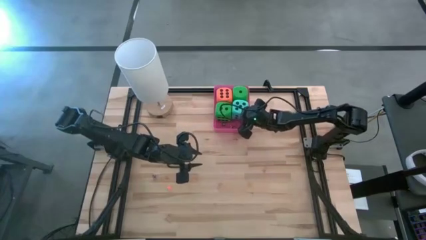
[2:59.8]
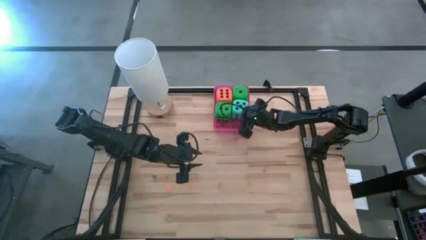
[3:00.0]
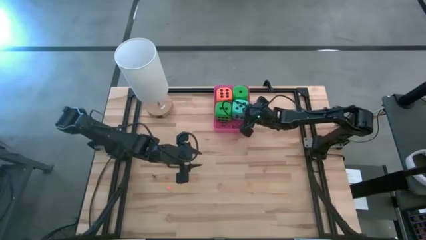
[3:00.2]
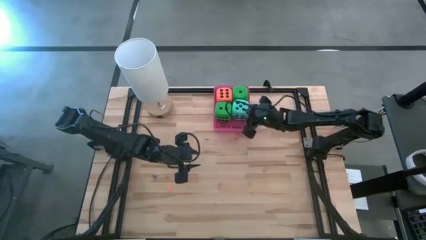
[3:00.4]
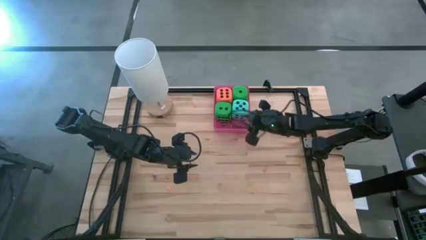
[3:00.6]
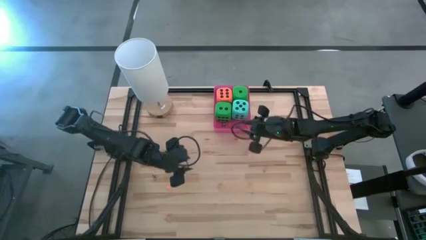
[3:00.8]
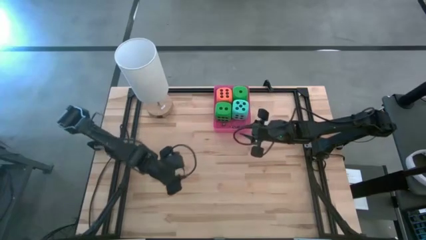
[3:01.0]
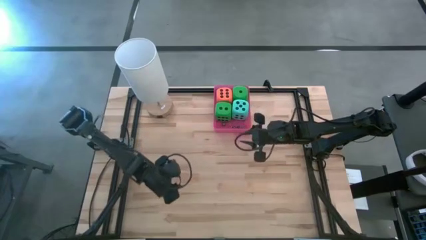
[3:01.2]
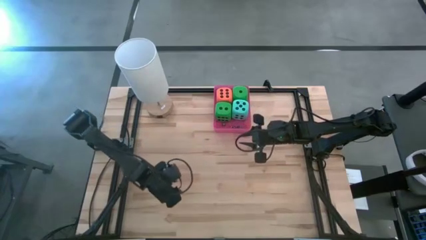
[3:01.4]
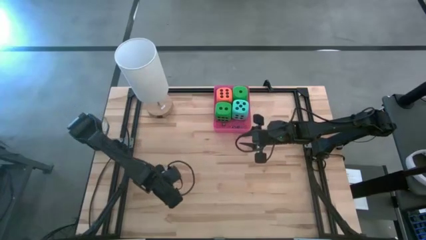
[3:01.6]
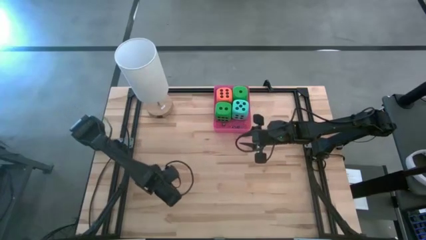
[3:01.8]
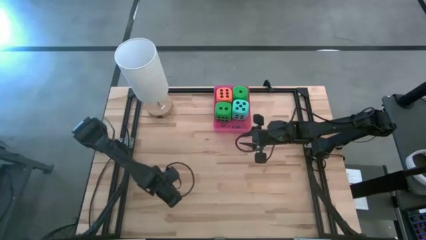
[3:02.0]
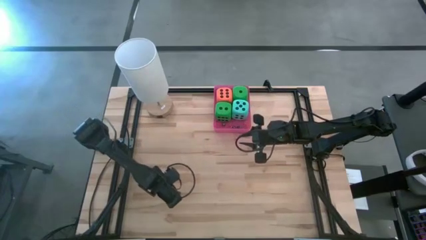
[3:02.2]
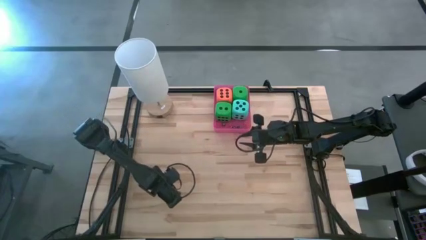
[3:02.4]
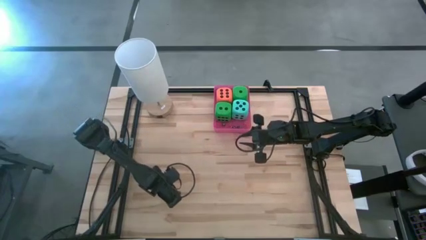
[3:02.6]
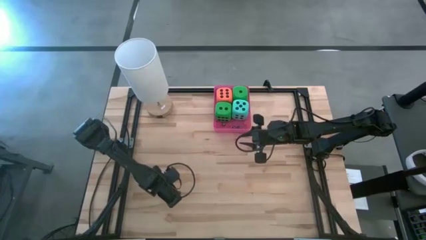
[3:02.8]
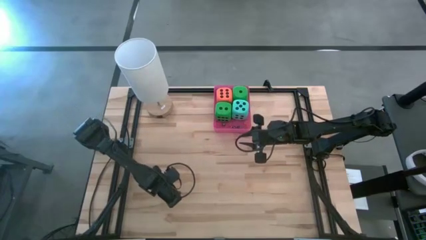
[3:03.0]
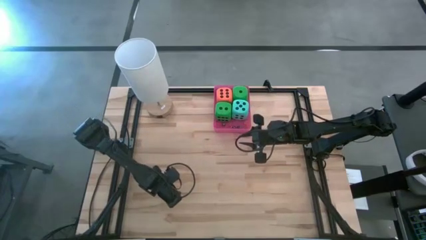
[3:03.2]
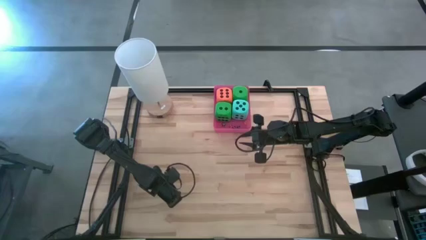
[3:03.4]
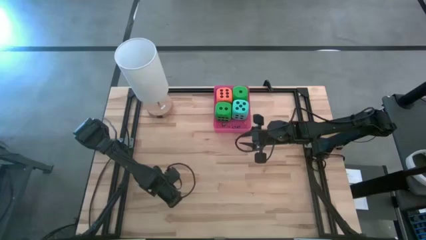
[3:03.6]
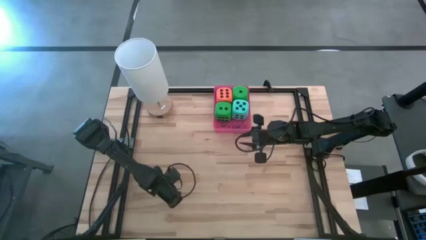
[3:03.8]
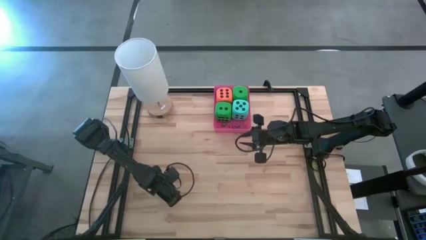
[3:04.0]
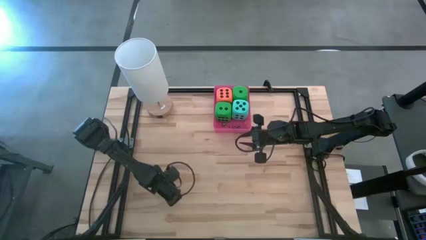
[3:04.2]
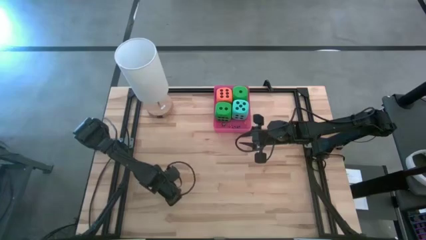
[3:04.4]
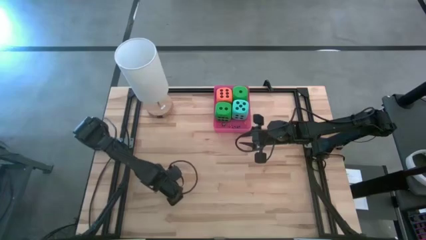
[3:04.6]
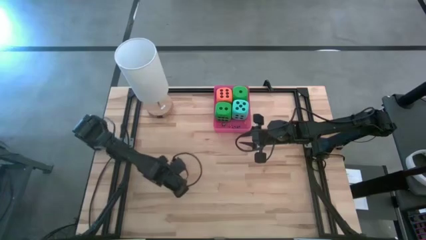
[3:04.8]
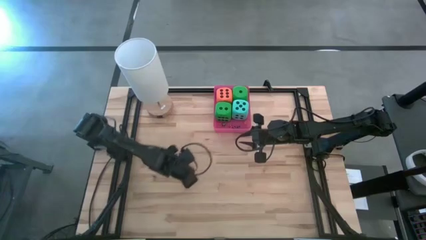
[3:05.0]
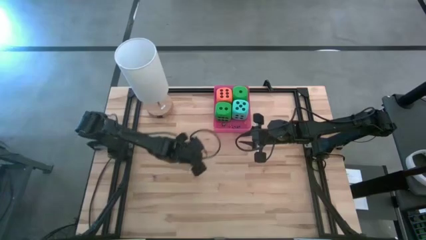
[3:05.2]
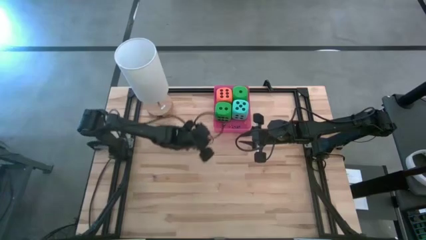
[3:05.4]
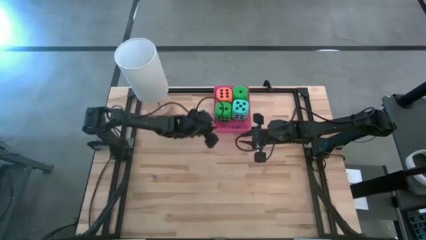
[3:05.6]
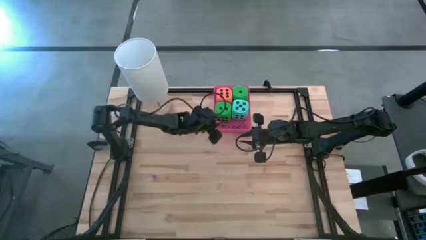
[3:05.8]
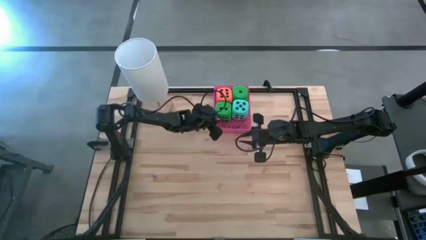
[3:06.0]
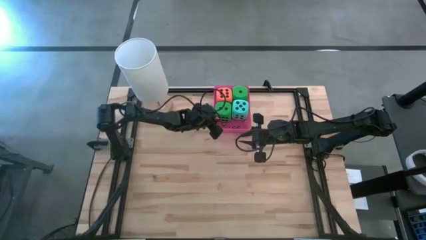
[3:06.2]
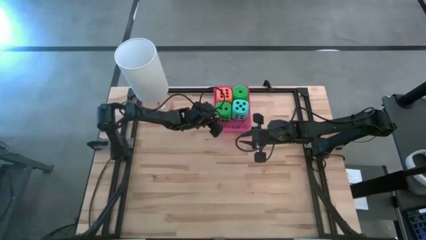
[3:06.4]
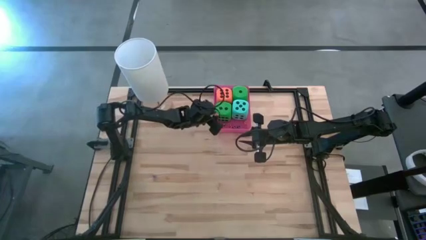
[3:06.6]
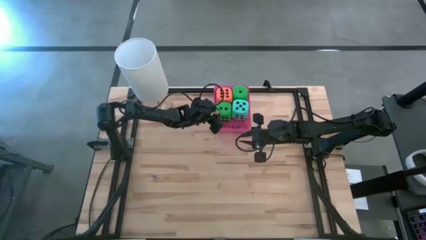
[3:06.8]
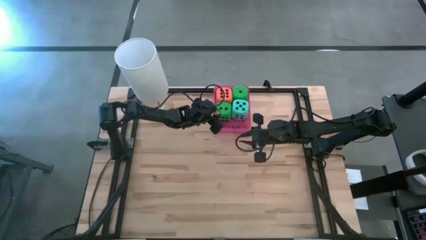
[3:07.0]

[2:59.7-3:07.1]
Task: Pick & Place Dice
Put the small orange dice into the red container

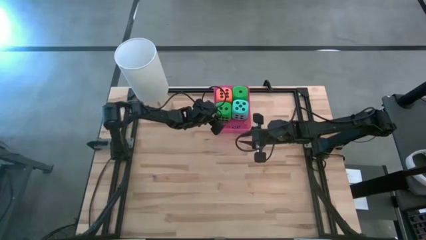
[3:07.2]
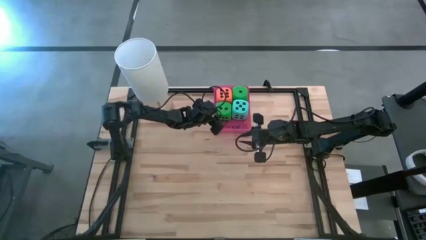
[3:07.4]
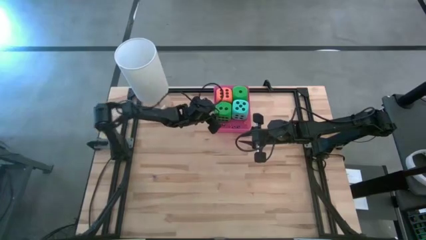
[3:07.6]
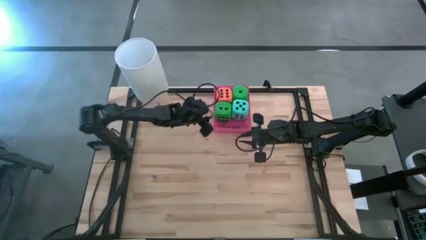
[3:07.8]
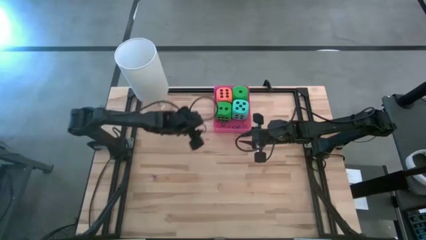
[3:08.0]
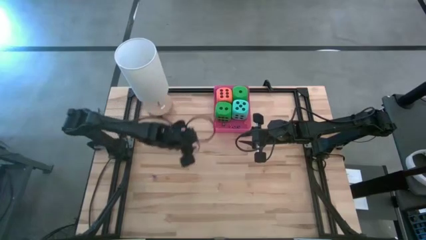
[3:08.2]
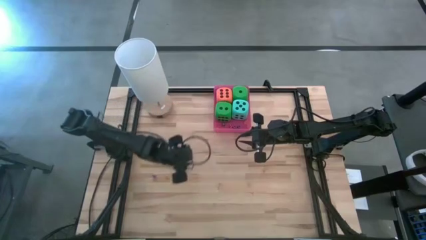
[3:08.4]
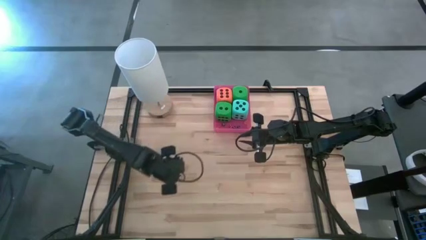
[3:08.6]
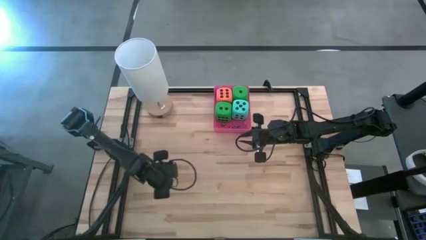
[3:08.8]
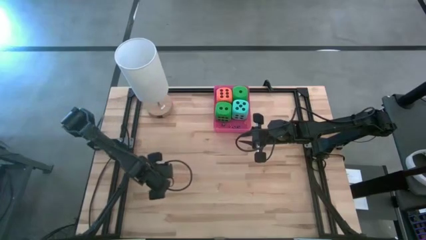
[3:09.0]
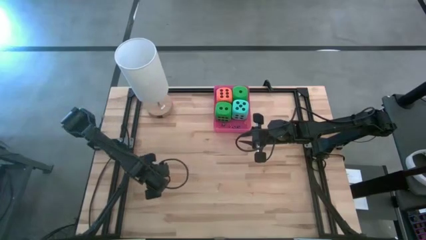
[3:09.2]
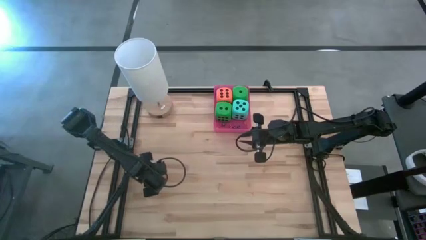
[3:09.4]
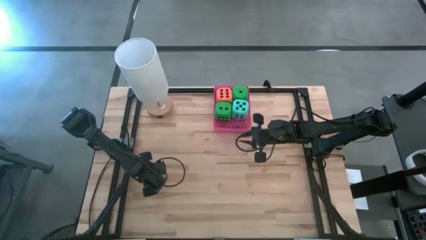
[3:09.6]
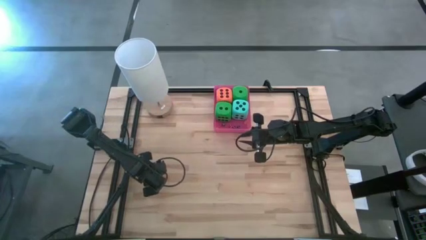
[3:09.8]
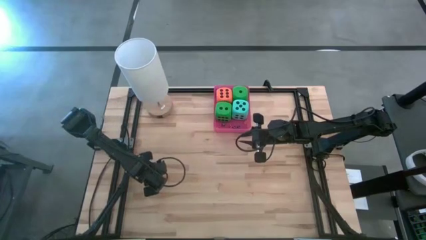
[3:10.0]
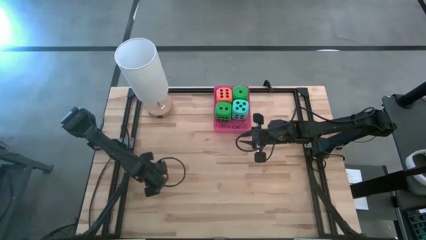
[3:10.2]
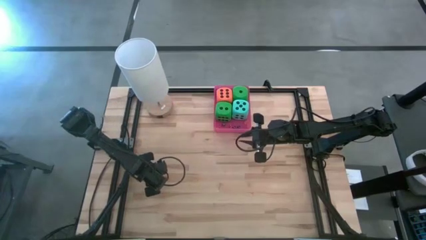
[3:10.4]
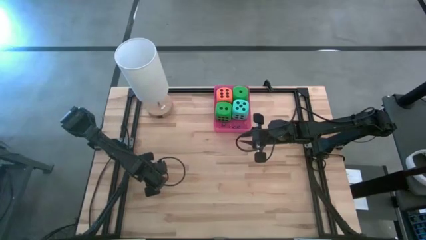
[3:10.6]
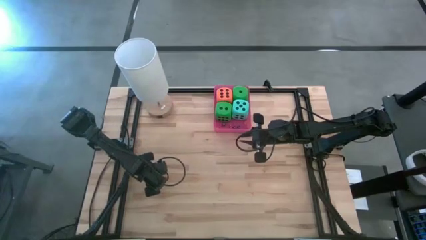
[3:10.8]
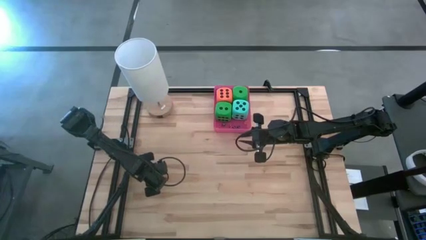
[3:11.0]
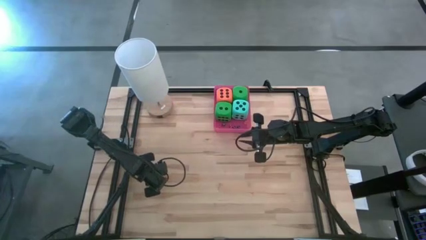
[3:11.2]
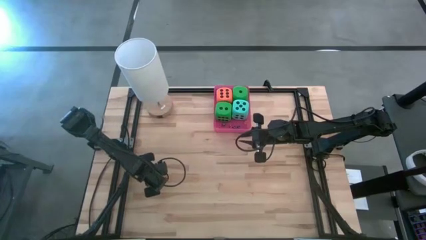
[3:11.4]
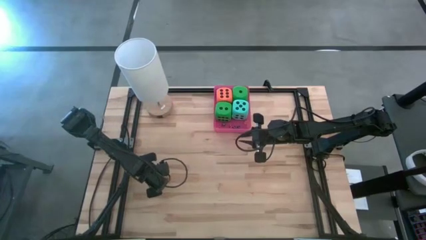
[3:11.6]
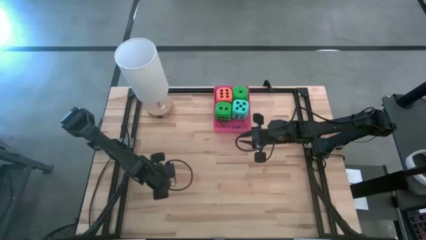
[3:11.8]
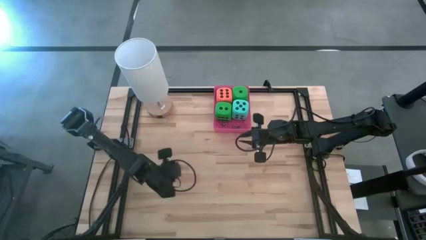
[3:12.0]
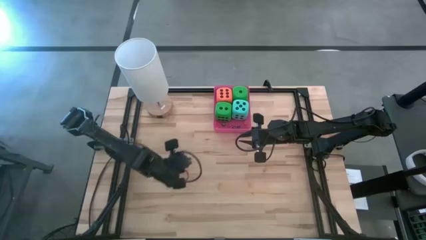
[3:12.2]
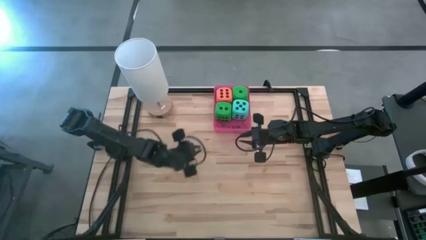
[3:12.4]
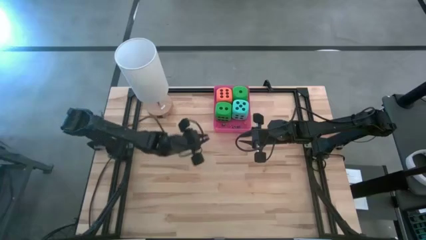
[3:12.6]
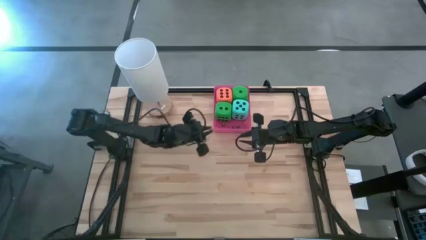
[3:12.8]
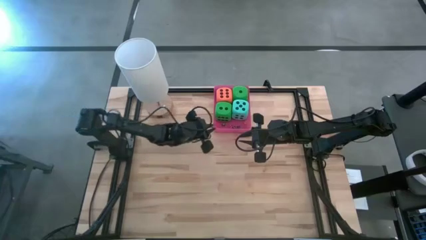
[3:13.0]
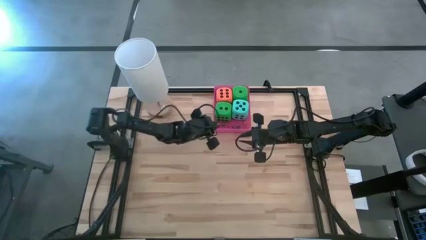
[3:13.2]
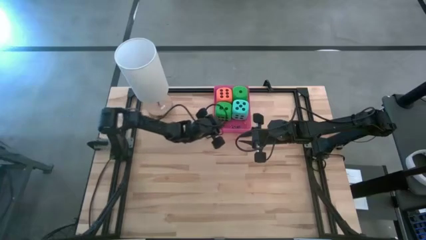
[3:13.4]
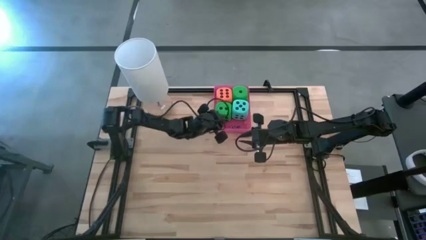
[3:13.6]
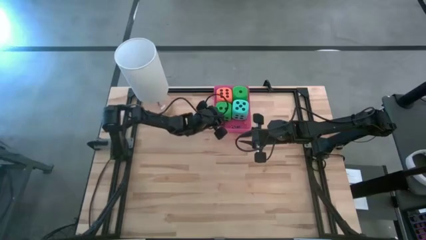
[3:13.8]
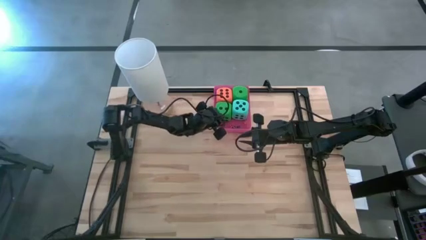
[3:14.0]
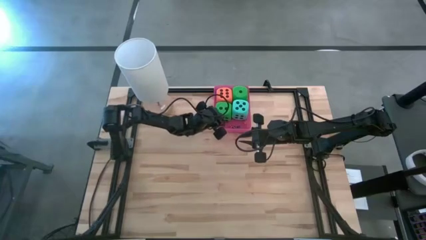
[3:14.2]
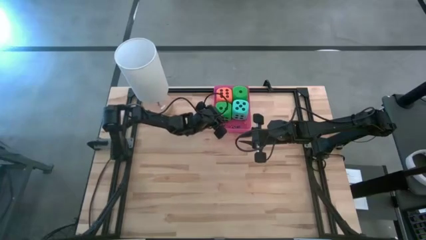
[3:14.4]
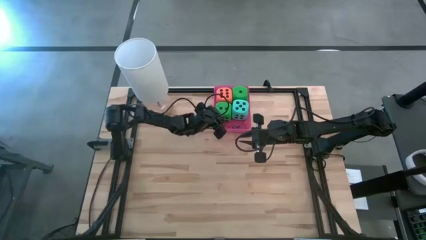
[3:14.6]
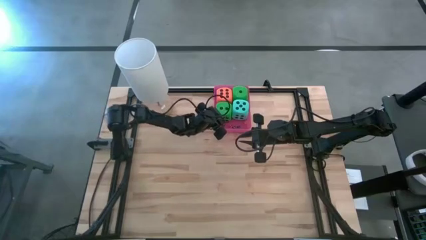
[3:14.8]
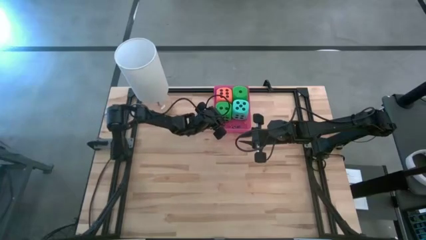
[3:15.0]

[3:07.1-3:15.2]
Put the small purple dice into the red container
